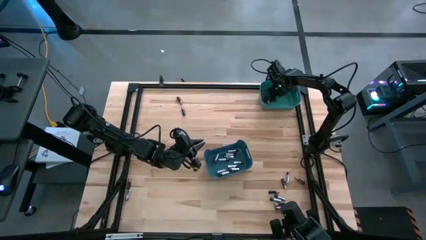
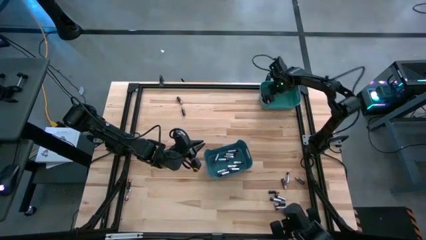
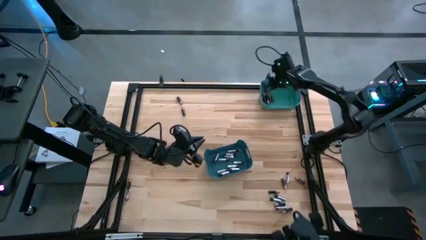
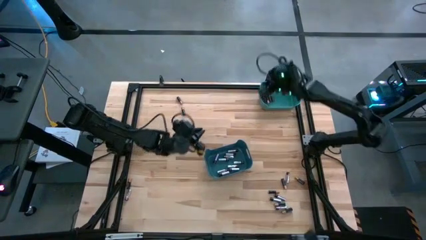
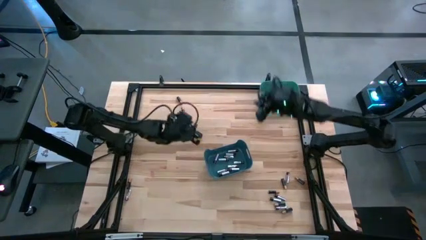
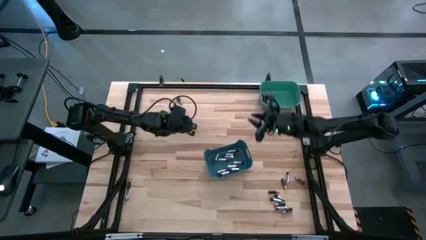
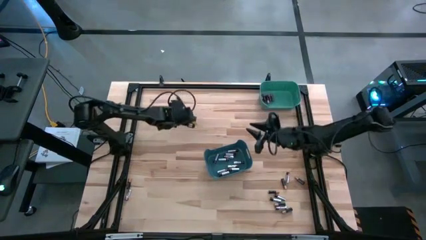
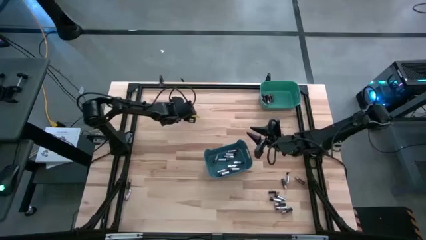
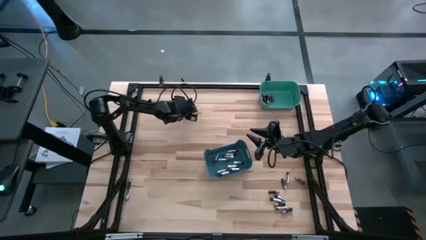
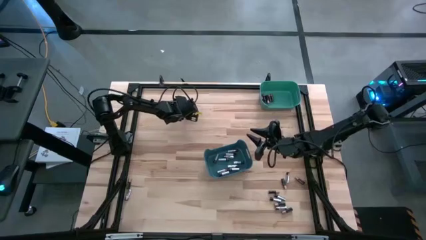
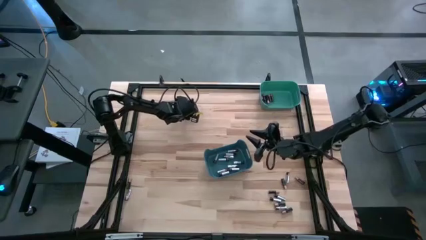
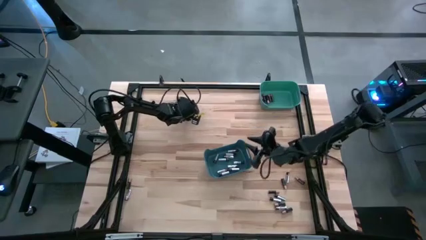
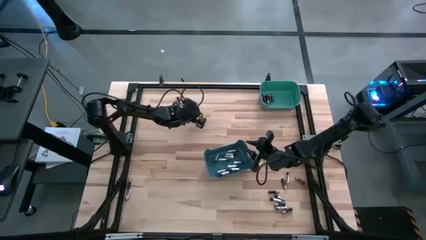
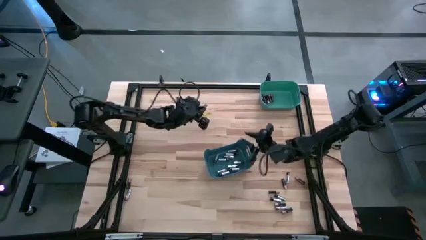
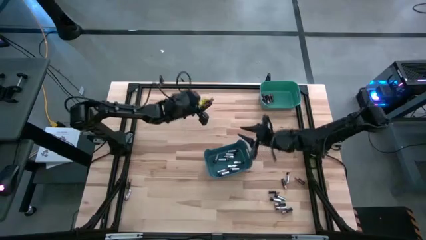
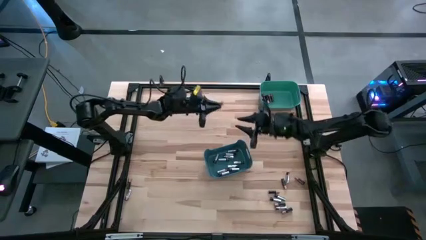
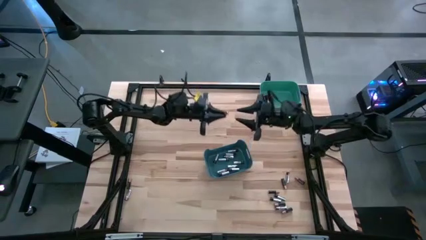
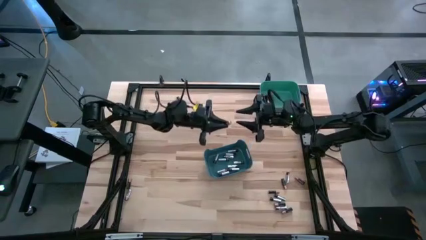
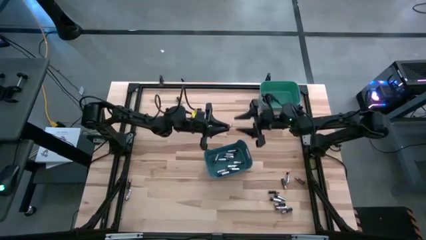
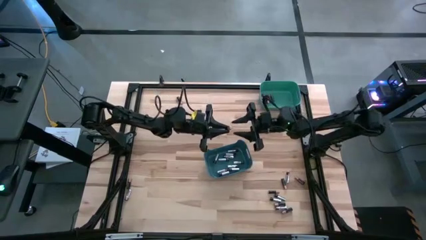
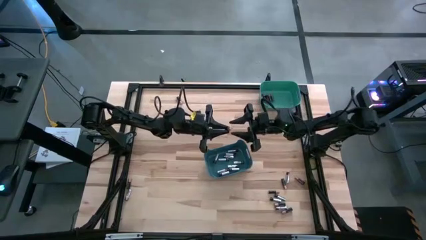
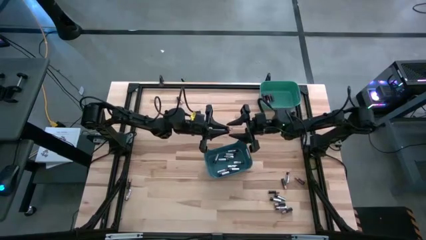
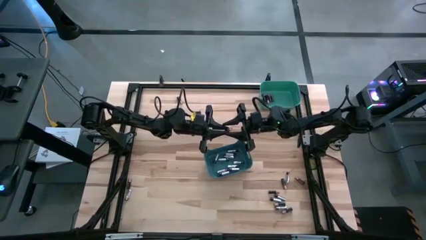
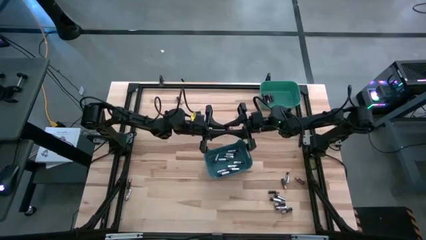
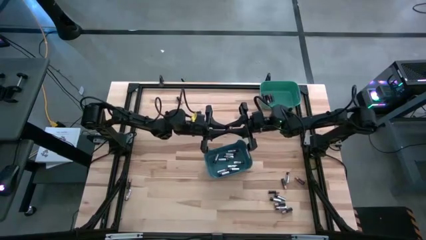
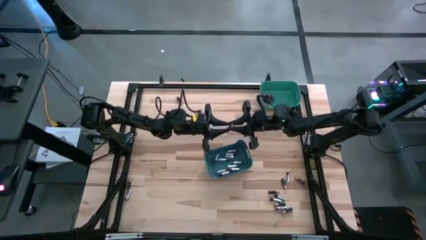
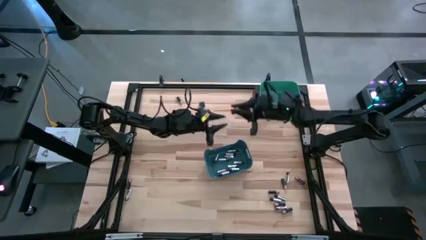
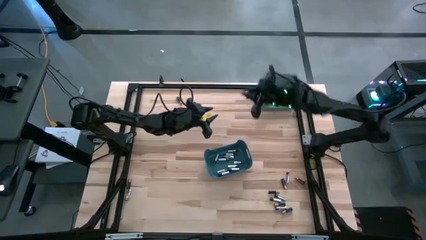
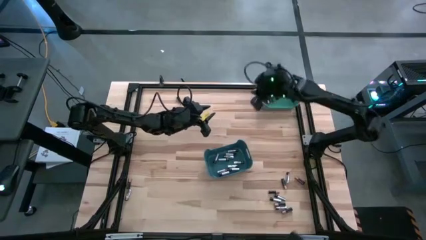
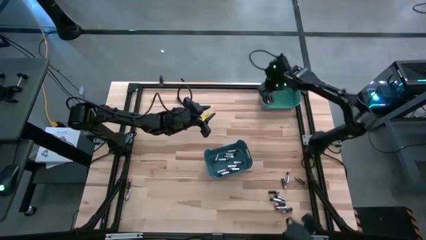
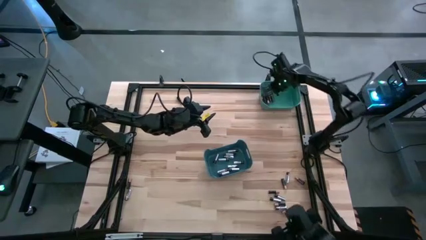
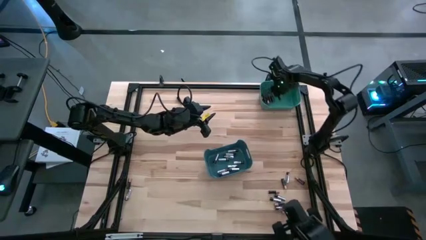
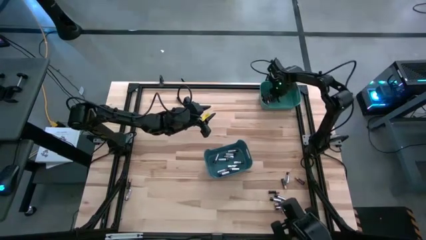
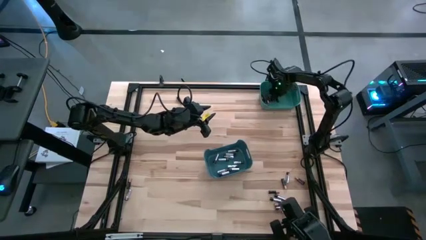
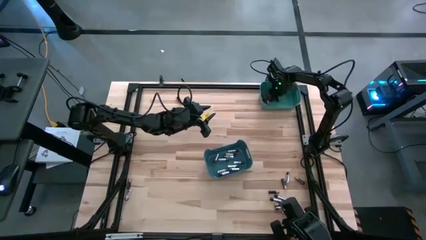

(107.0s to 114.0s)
Task: Sort batteries
Put the black battery into the green bin

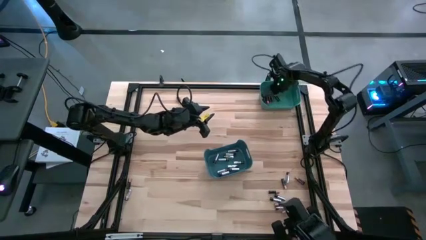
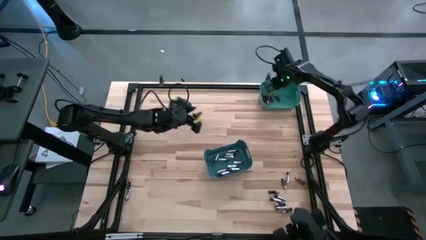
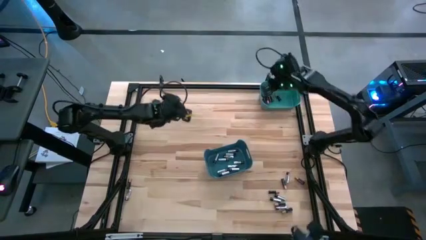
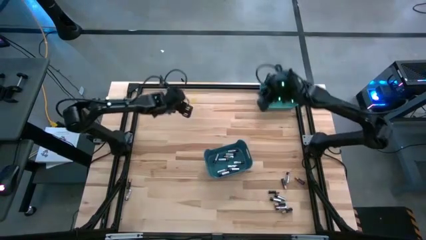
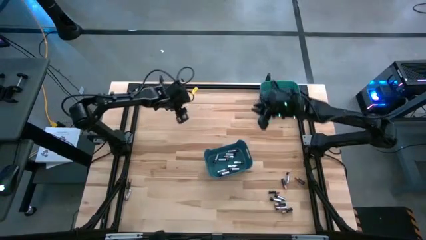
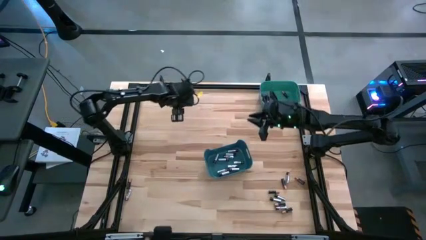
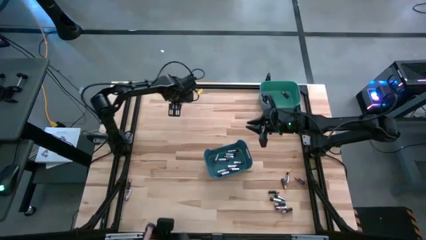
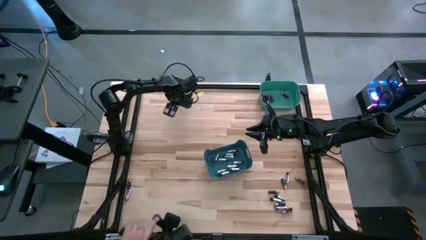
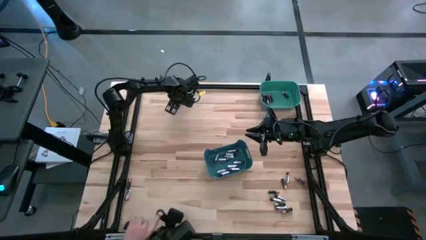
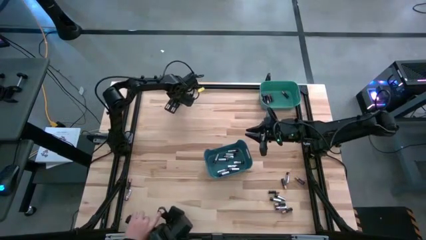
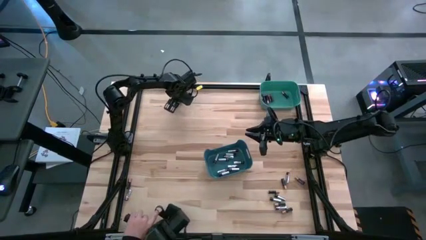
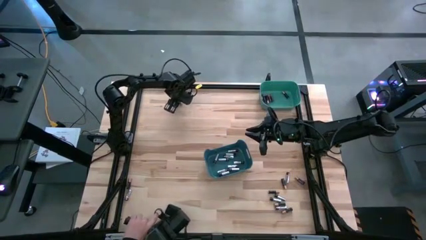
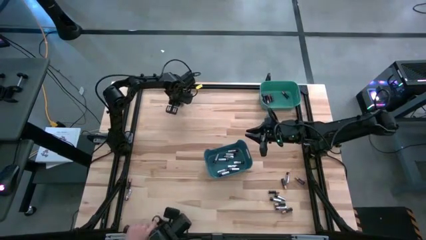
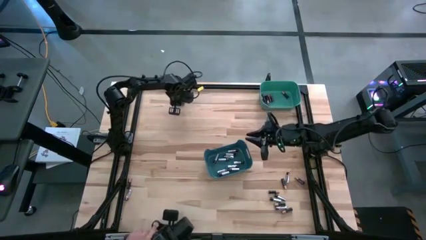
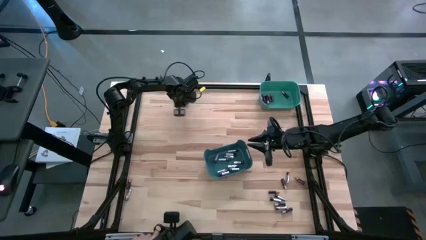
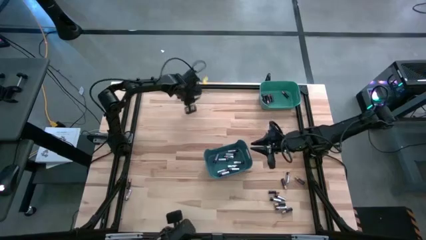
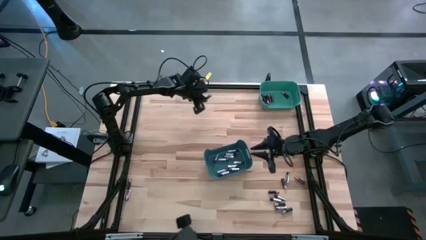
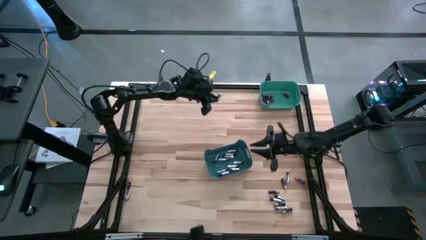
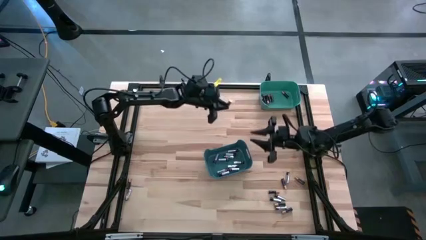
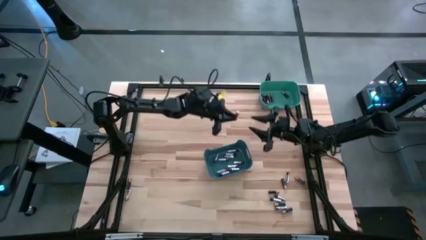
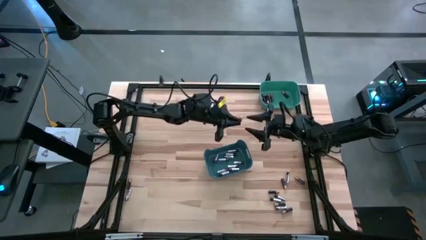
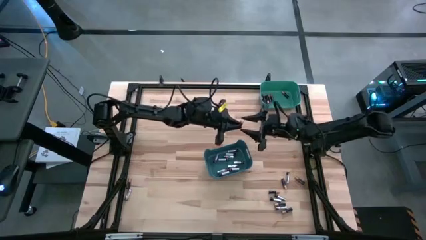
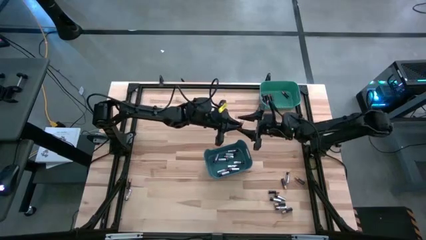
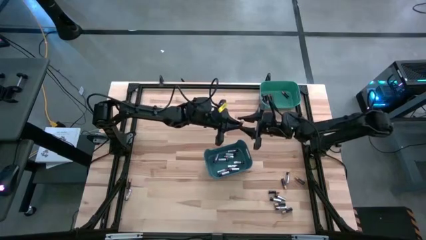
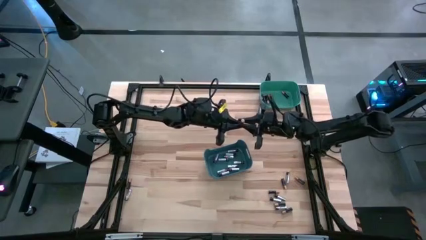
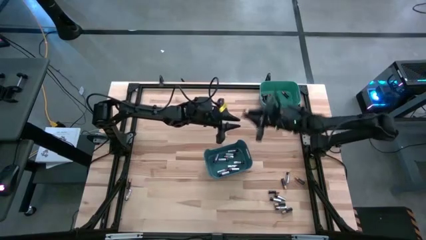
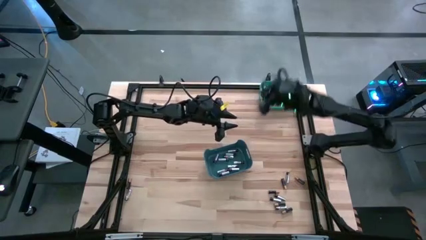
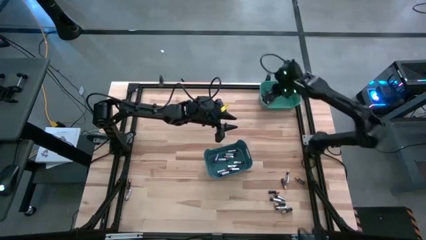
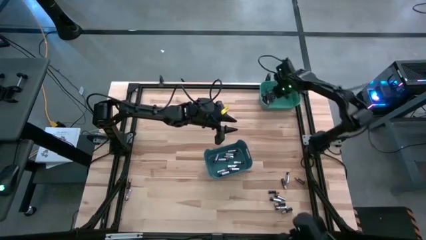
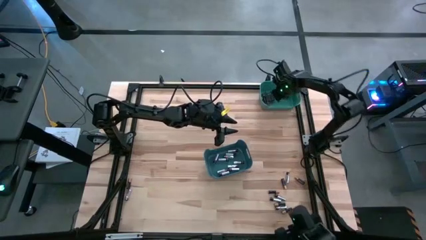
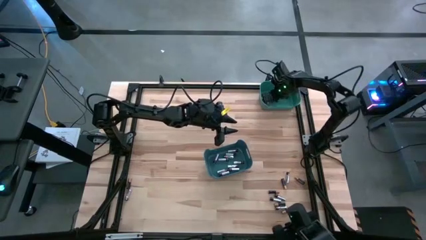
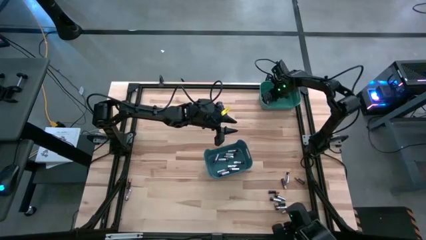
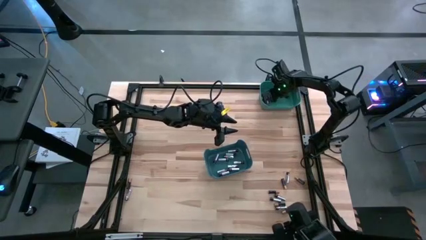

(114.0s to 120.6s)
Put the black battery into the green bin

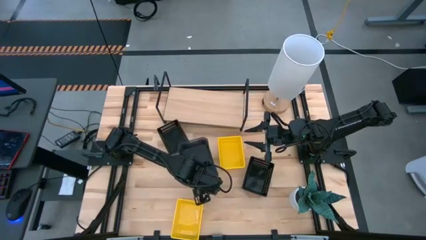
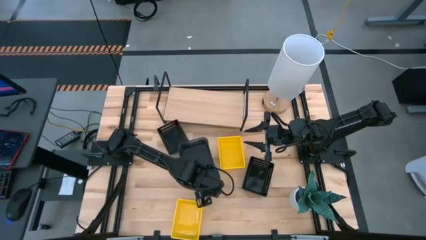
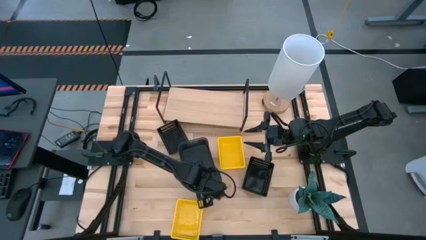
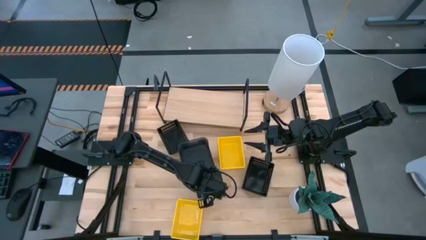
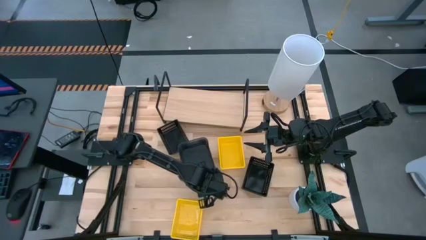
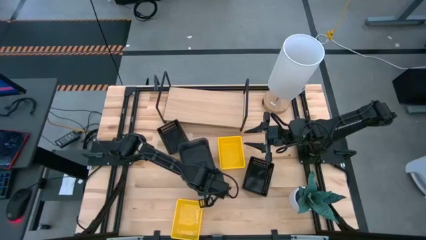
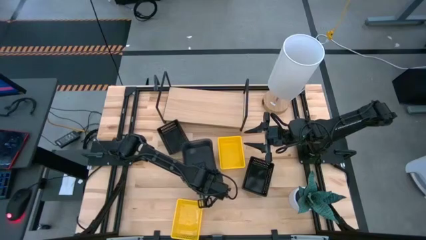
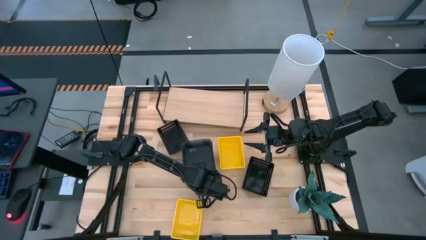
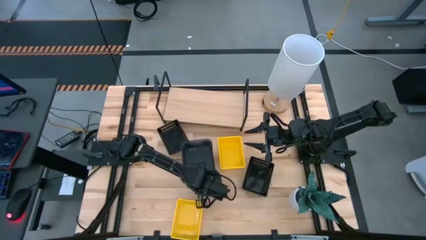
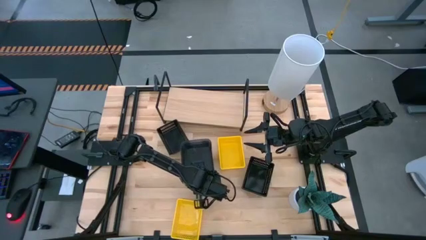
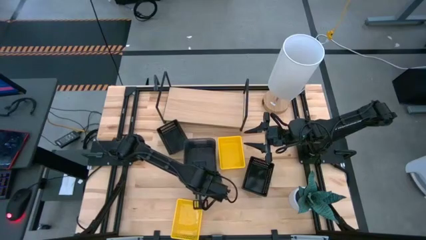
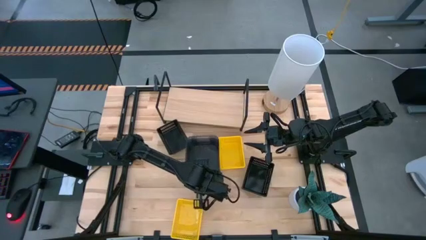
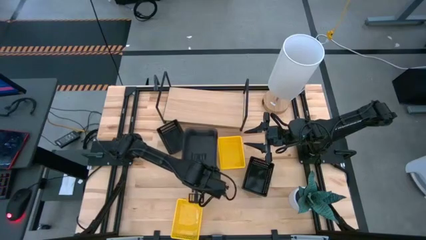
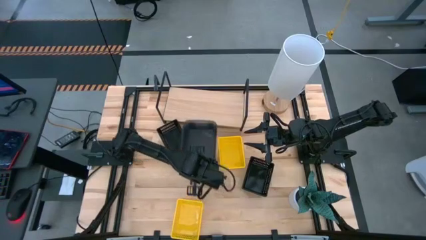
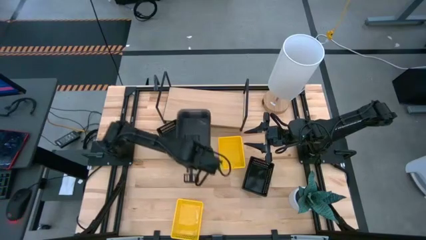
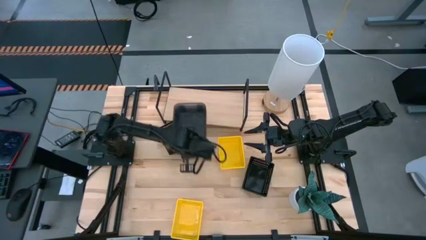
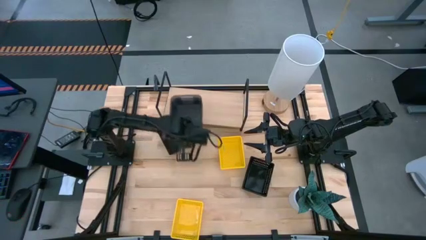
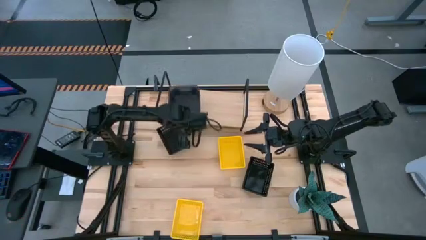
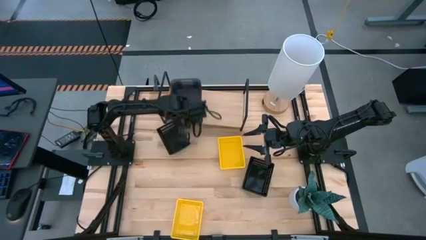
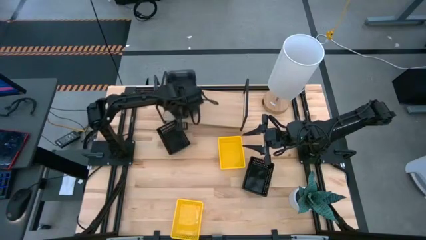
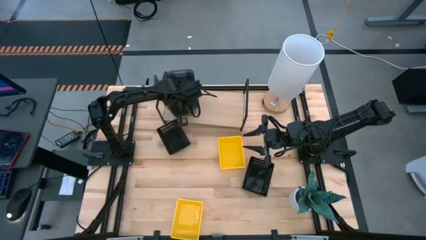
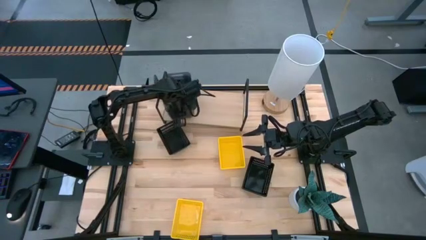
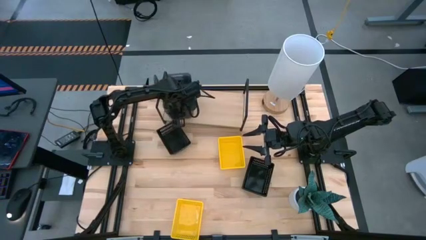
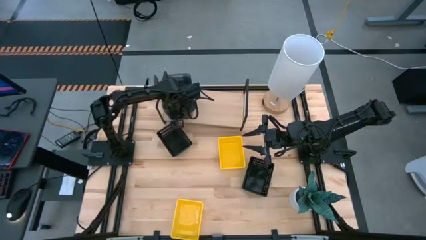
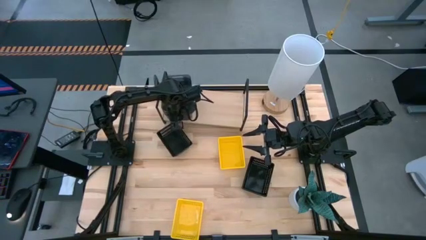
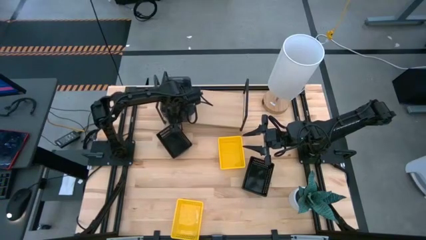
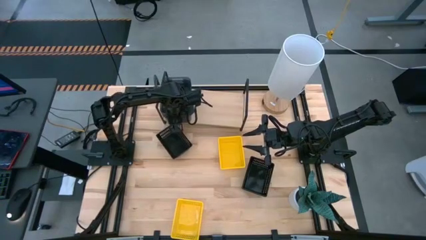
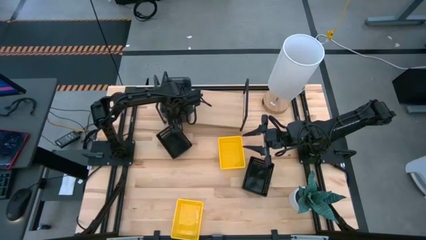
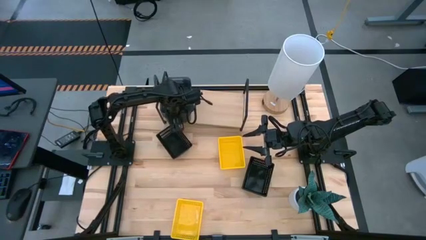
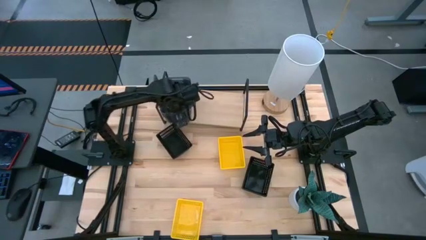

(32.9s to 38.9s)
Task: Stack baskets on shelf by color
Put the stacked gray bins on the shelf
